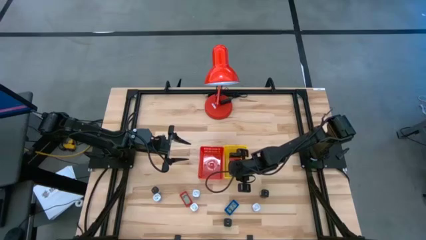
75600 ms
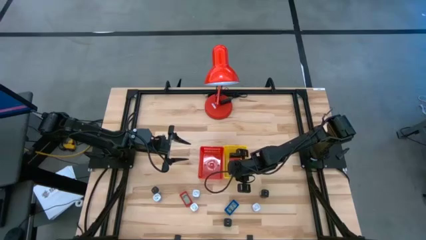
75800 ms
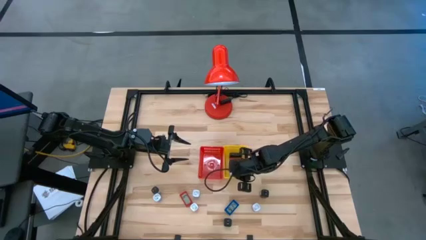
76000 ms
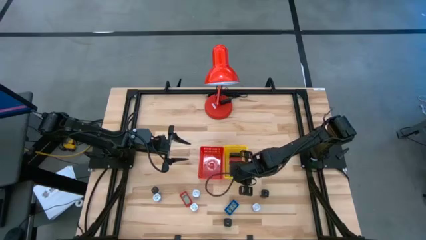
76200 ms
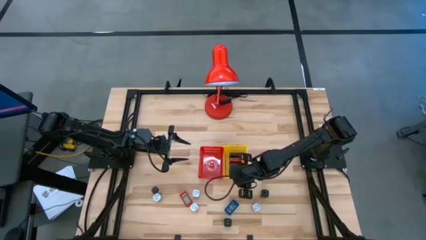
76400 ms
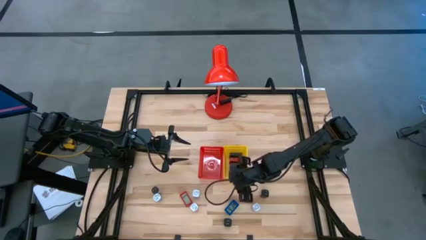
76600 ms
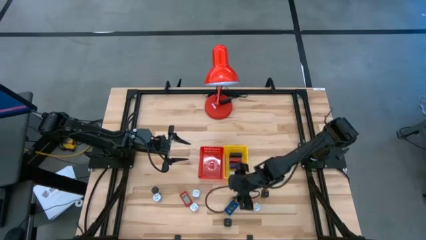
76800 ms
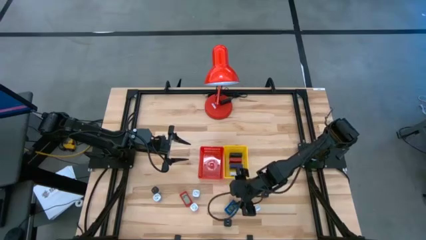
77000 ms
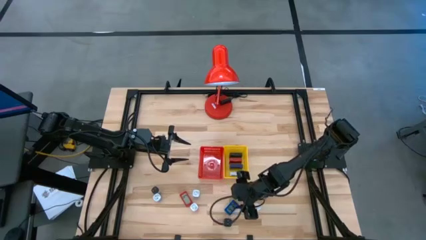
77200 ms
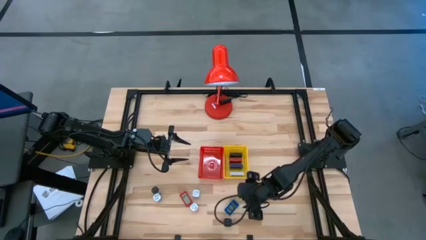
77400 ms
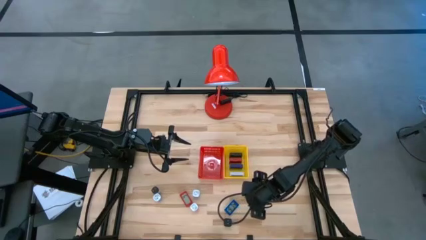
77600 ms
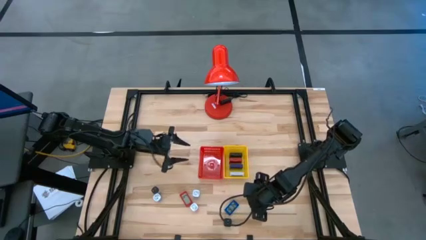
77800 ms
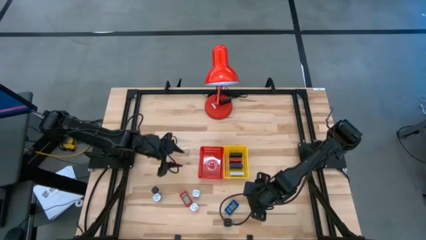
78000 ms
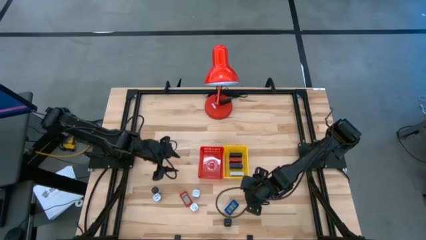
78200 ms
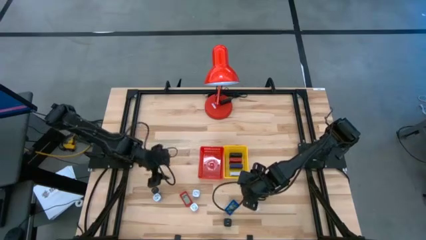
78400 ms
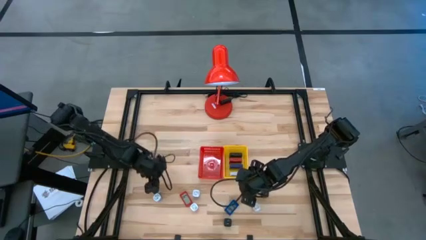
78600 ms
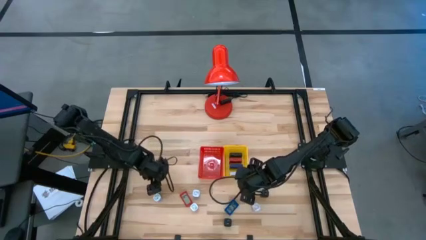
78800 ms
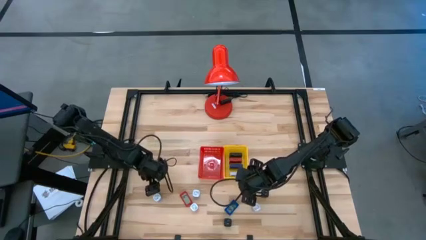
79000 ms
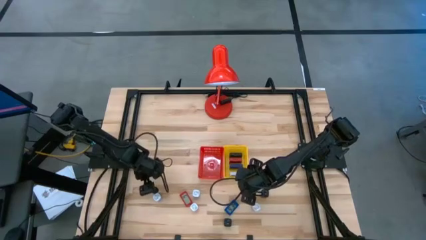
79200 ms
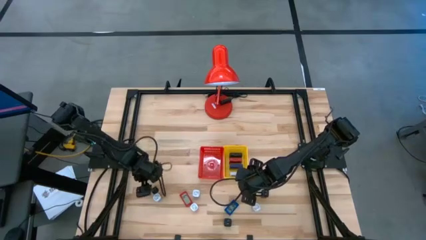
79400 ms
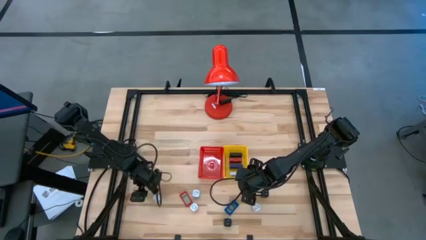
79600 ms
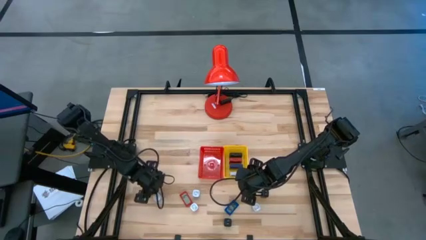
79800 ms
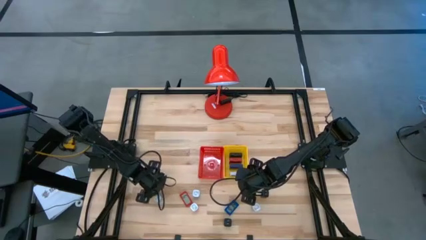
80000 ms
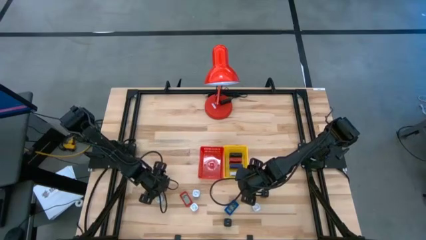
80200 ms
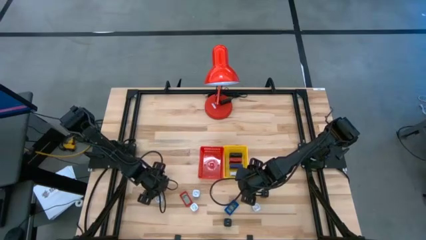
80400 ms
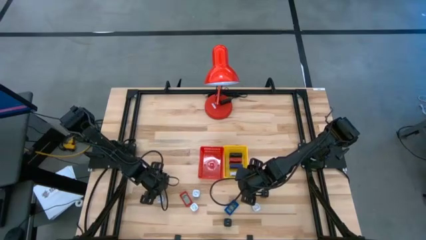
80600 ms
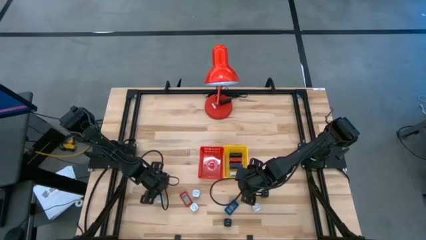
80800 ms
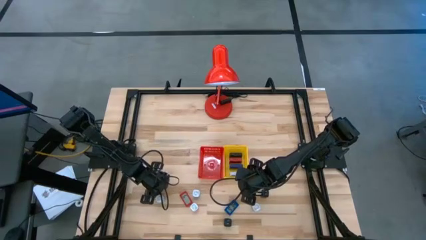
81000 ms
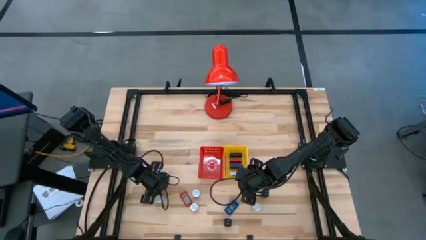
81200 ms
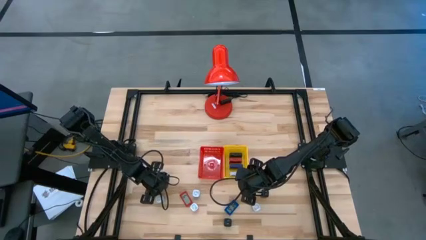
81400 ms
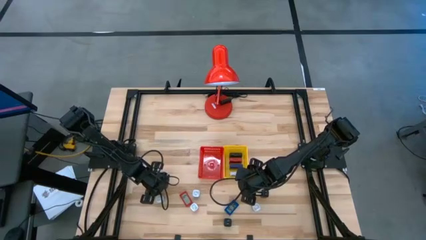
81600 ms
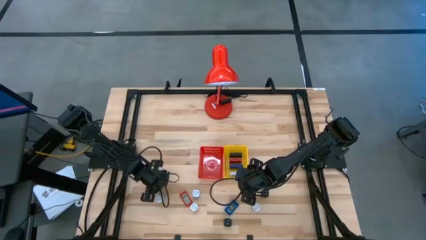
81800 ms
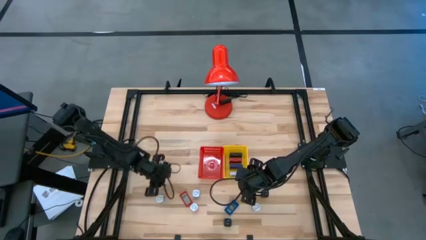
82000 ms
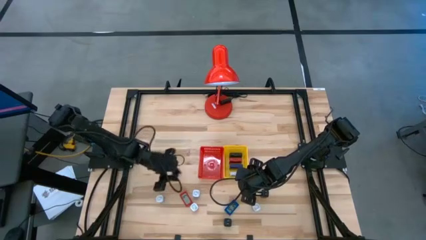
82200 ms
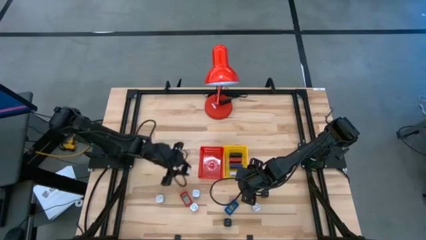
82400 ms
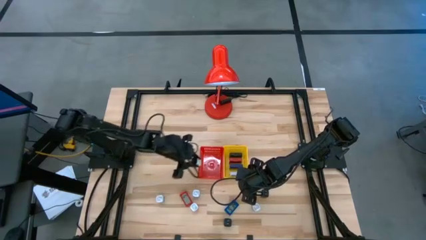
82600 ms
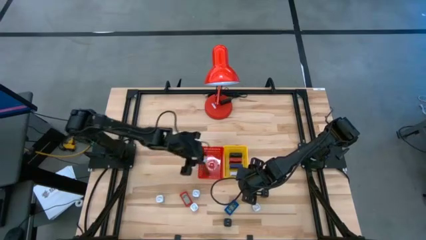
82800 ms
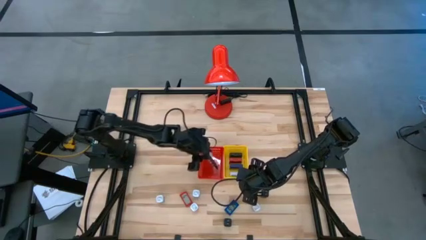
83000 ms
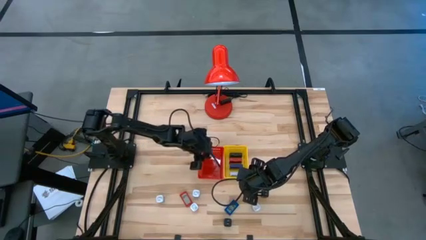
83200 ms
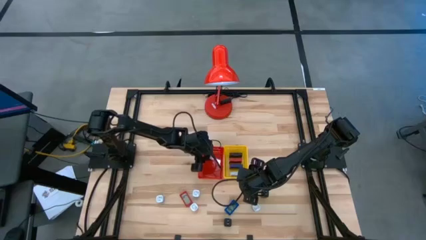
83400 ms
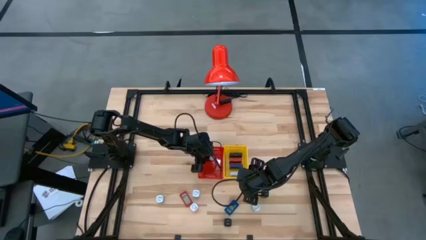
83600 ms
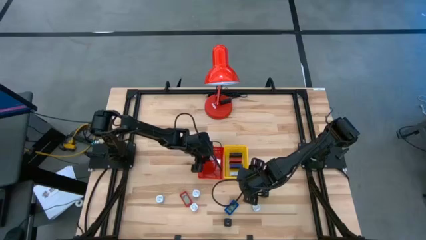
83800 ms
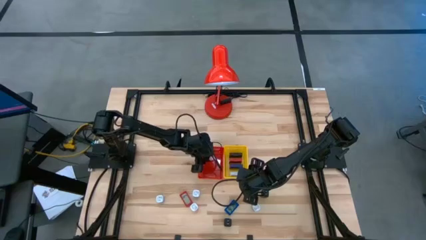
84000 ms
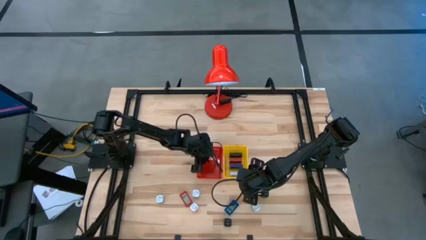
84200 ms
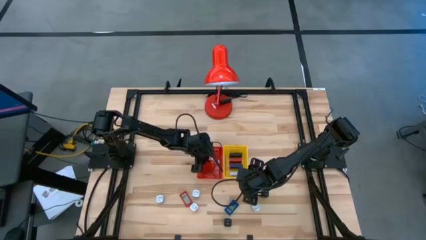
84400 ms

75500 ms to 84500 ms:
Task: Pick & Place Office items
Put the top left black white charger adapter into the red bin

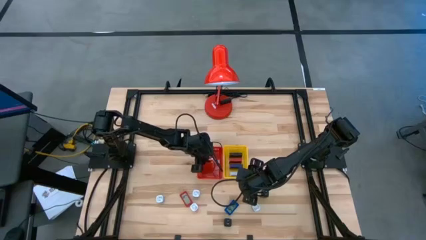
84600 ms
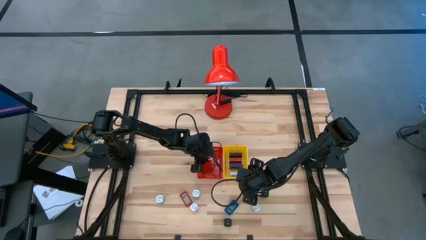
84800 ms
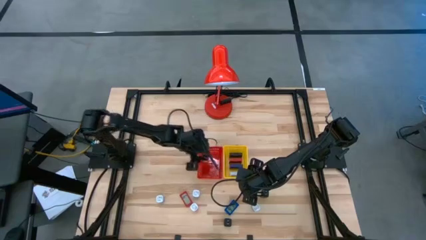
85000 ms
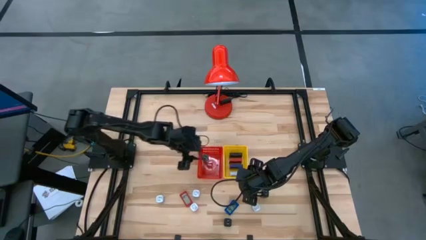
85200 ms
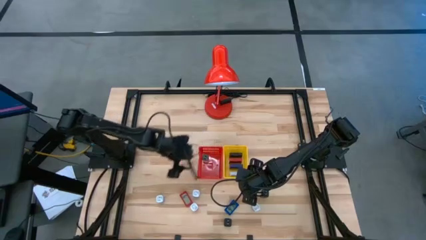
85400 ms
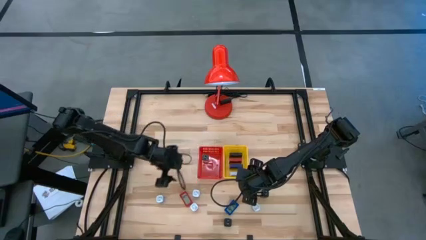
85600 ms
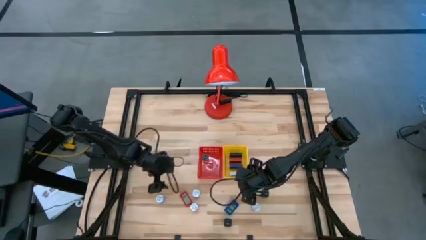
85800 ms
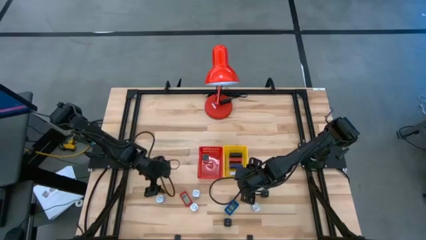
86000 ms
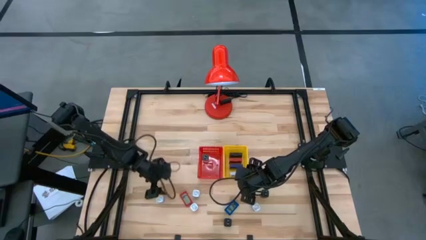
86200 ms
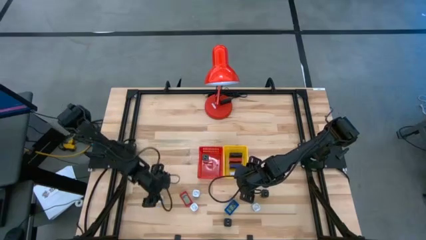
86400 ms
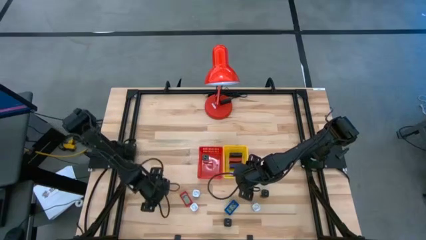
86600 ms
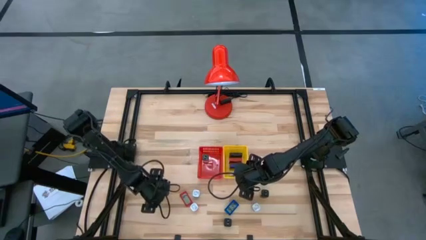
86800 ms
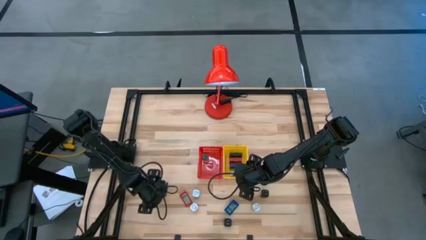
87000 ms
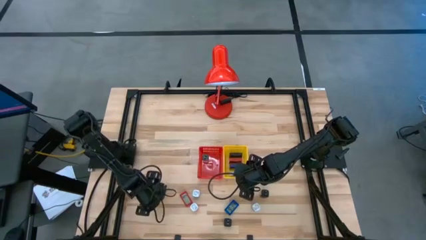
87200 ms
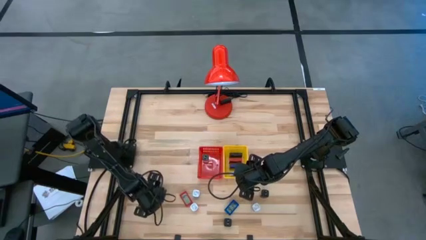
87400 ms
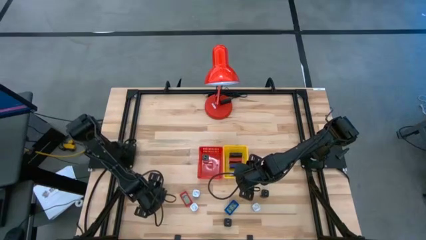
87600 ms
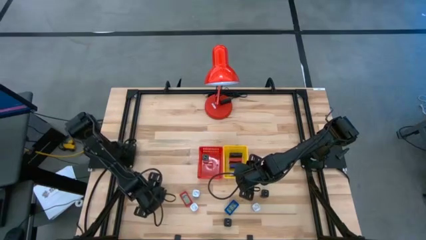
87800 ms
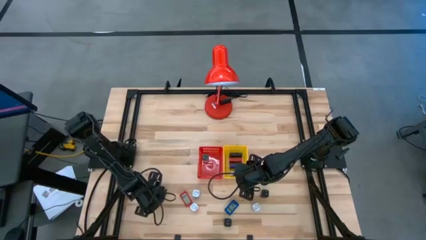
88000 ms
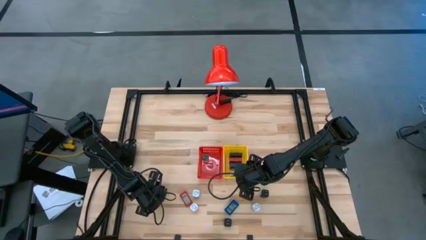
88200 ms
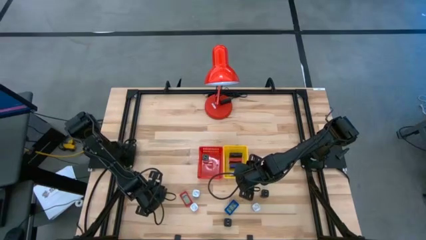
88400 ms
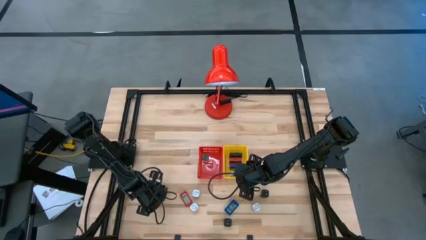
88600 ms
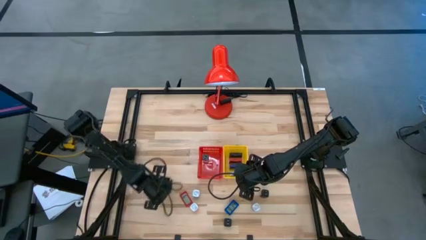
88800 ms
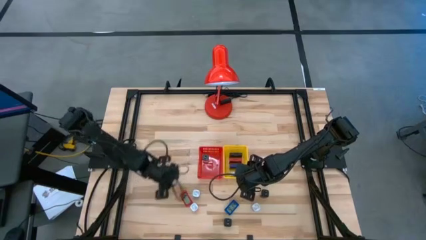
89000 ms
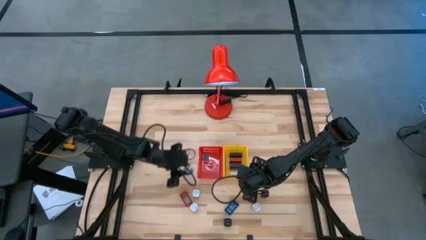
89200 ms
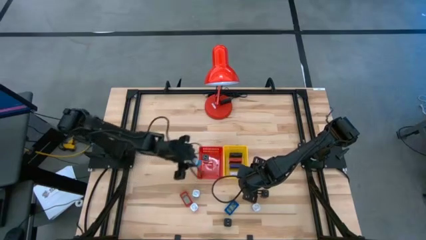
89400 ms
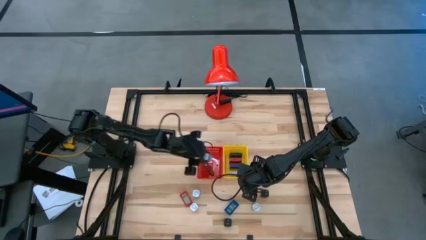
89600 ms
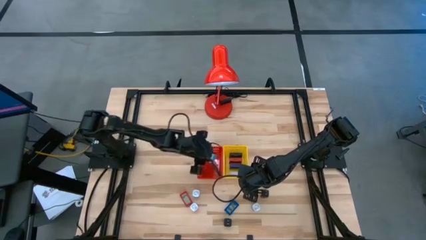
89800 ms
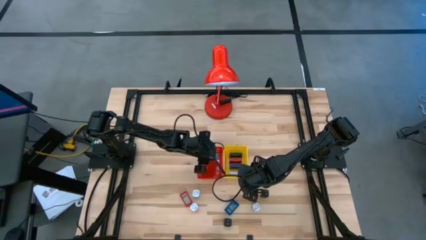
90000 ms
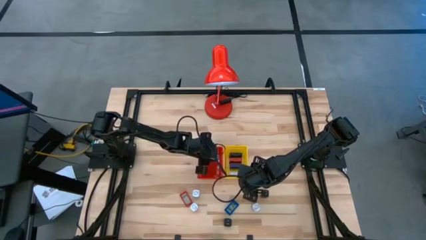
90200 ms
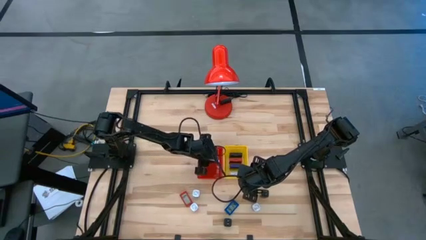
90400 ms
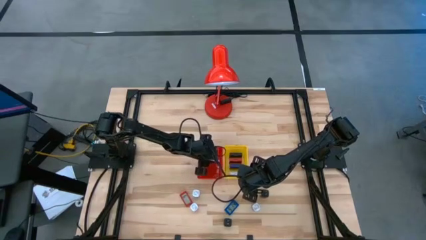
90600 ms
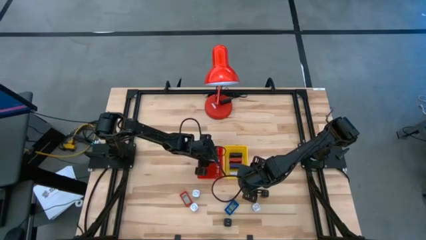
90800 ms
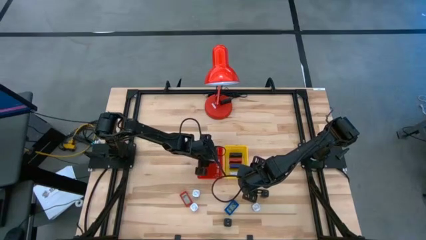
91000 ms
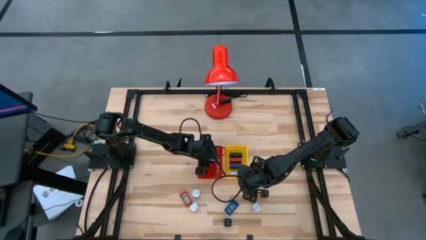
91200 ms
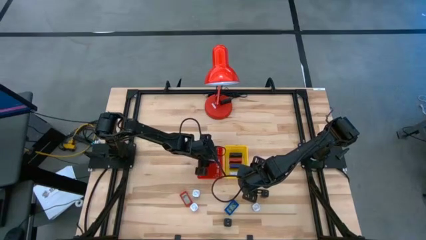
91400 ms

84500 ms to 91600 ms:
Put the left blue charger adapter into the red bin

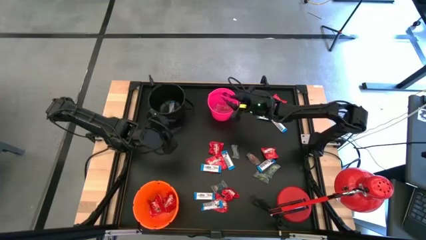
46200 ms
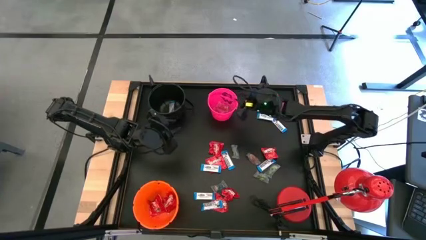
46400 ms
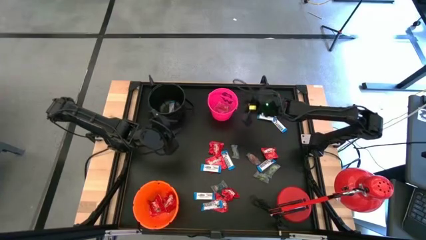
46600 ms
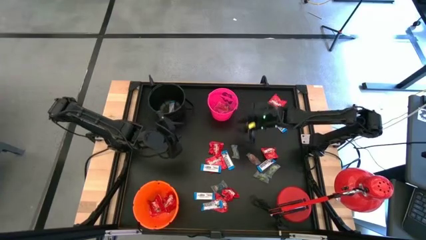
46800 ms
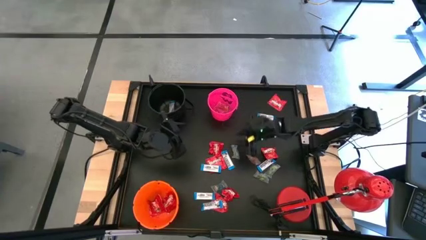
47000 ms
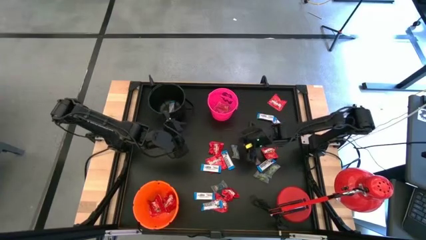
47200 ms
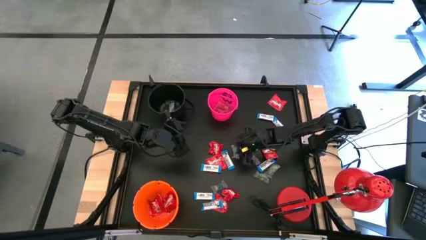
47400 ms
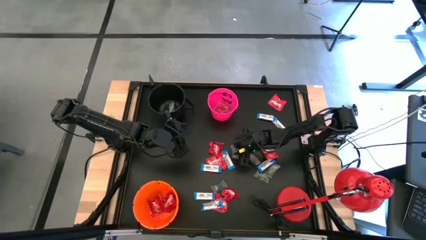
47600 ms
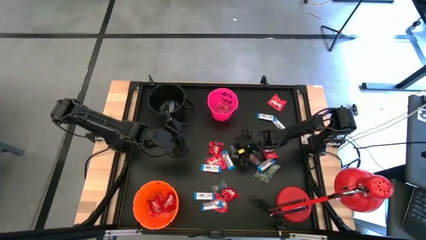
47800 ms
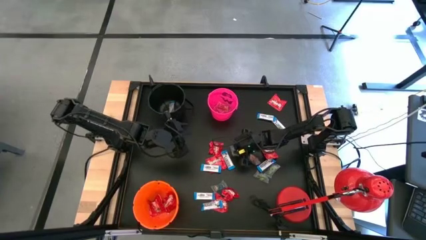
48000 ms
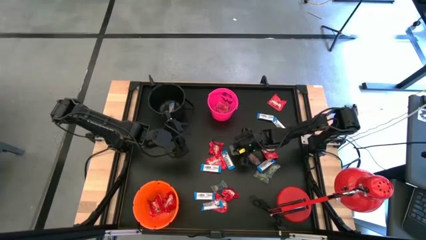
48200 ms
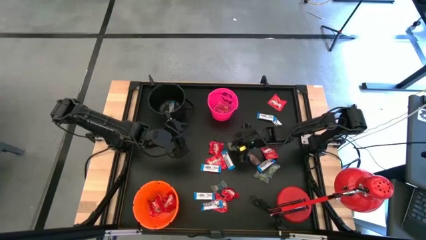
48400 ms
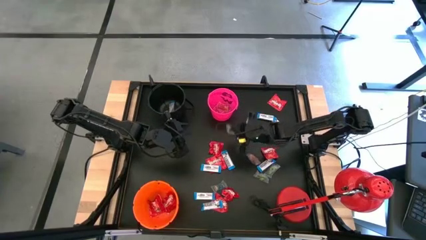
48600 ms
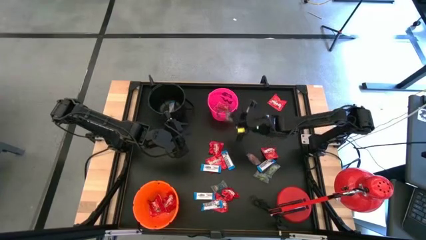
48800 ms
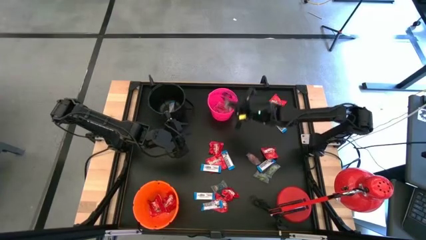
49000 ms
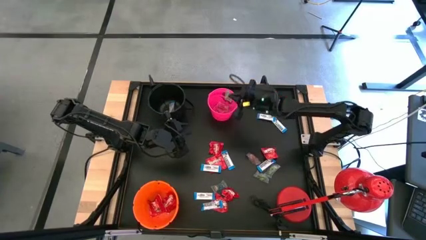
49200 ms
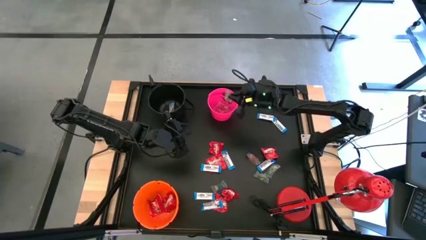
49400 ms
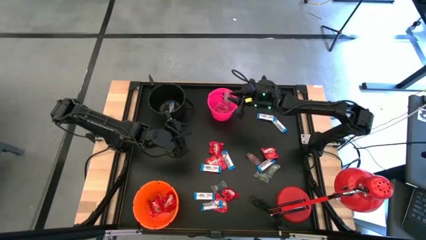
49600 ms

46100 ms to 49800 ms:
Task: Organize candy in baskets
Put the green gummy into the pink bucket
